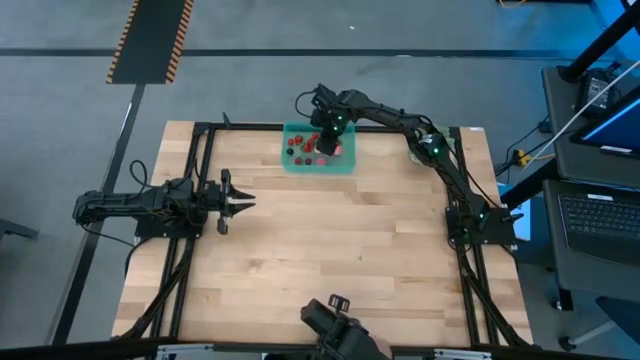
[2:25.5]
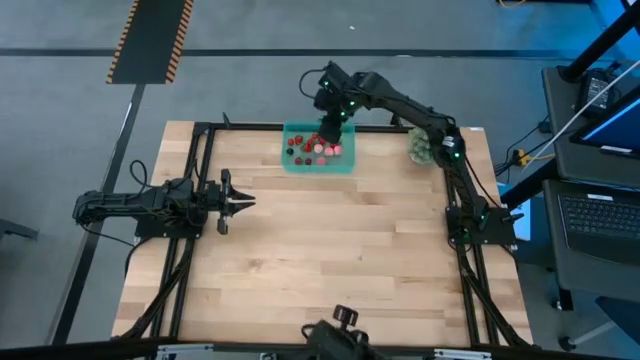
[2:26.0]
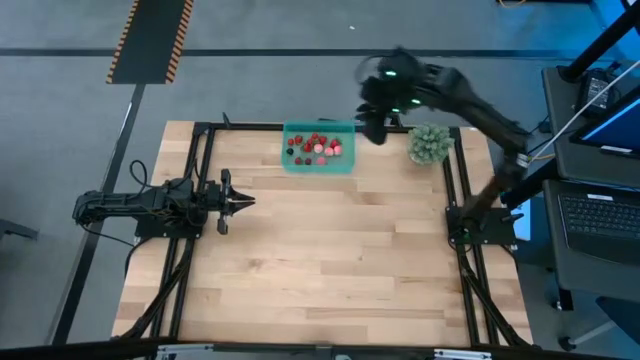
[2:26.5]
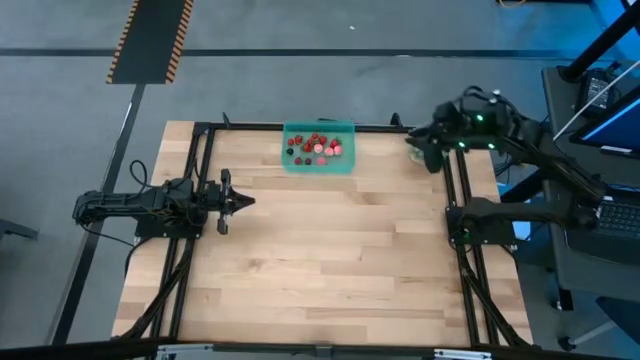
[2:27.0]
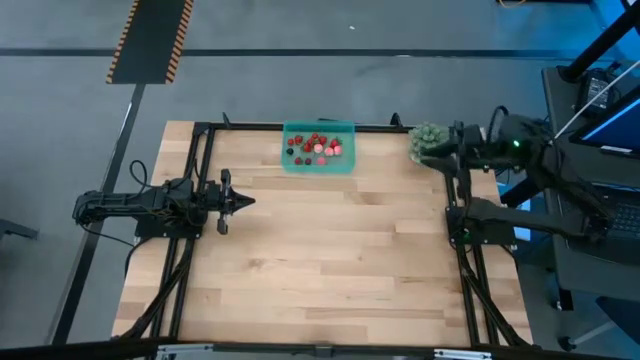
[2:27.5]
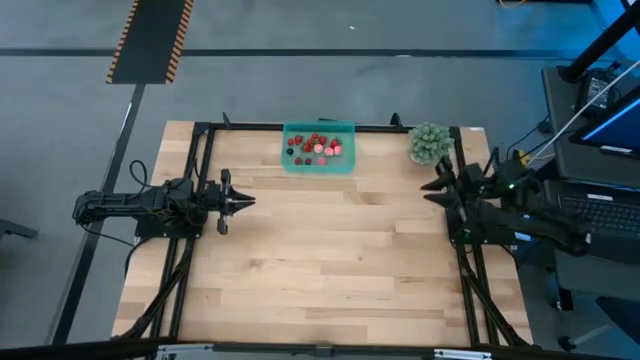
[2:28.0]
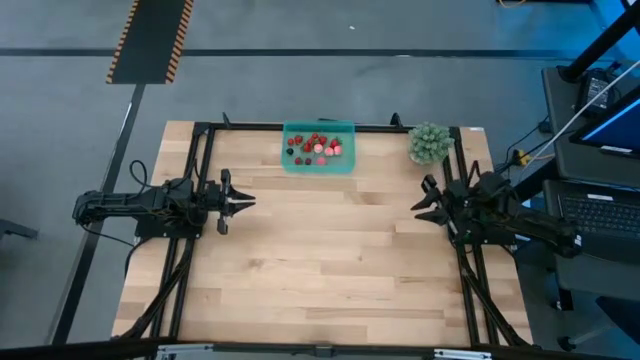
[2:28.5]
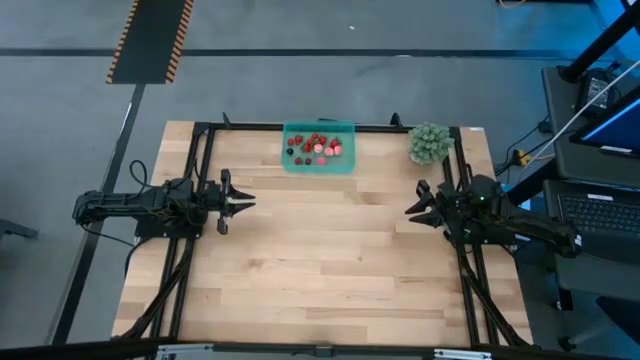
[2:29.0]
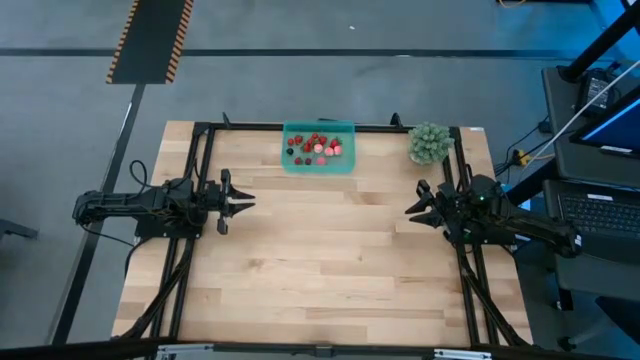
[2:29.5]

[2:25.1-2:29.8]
Task: Pick and placing Produce into tupperware
Return to Home Position

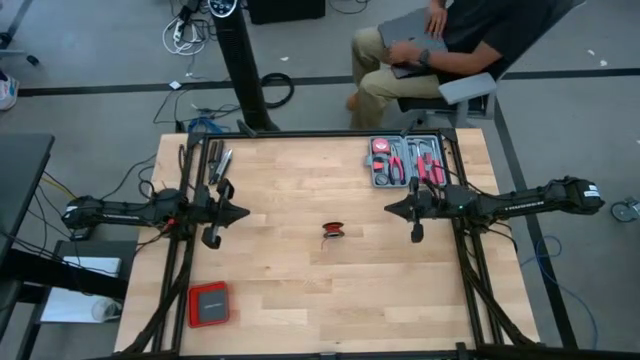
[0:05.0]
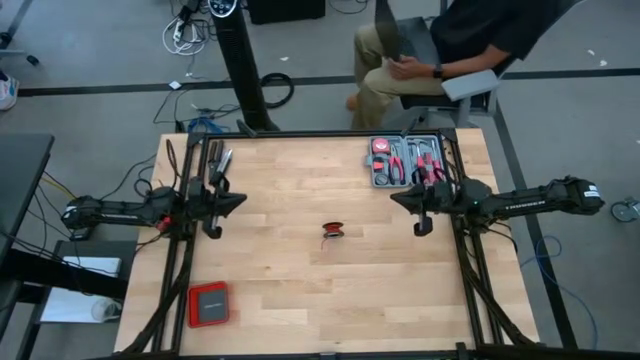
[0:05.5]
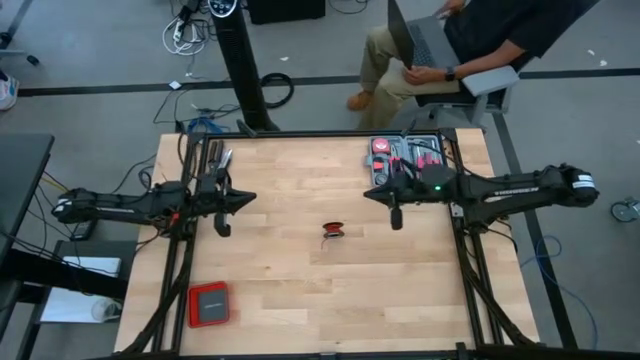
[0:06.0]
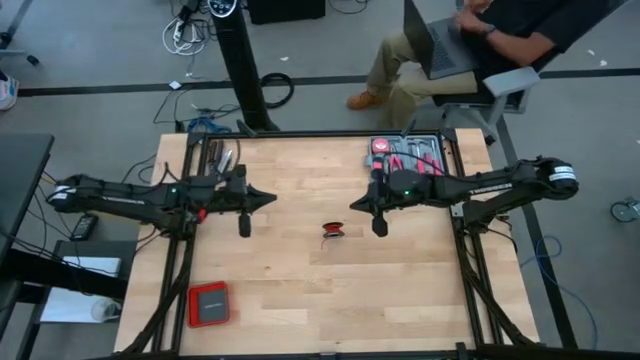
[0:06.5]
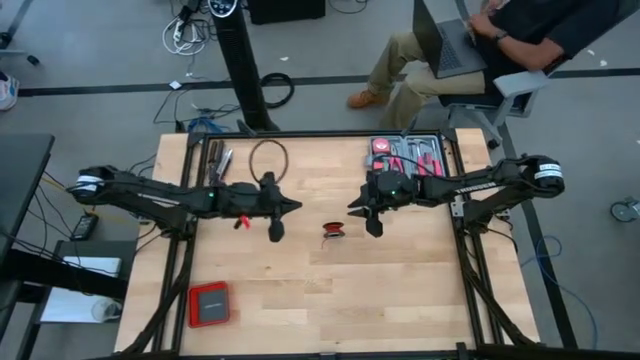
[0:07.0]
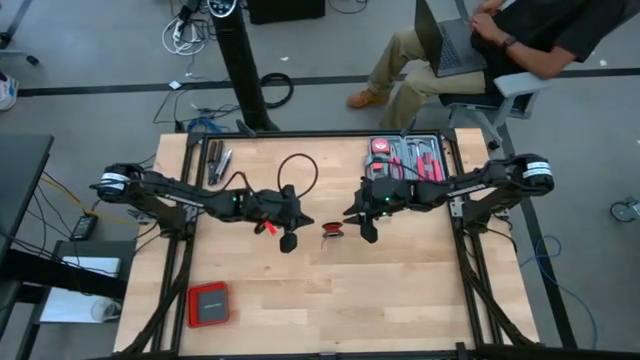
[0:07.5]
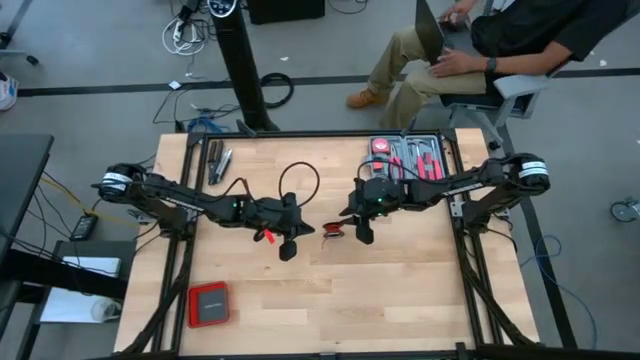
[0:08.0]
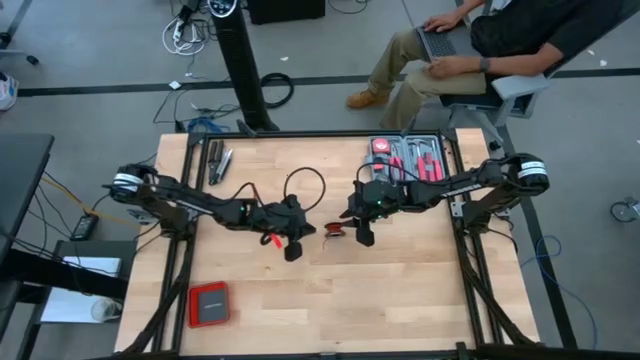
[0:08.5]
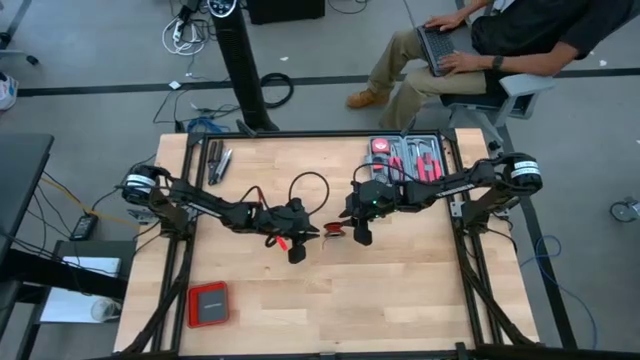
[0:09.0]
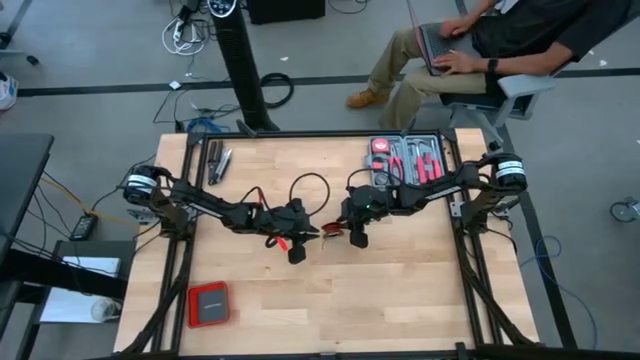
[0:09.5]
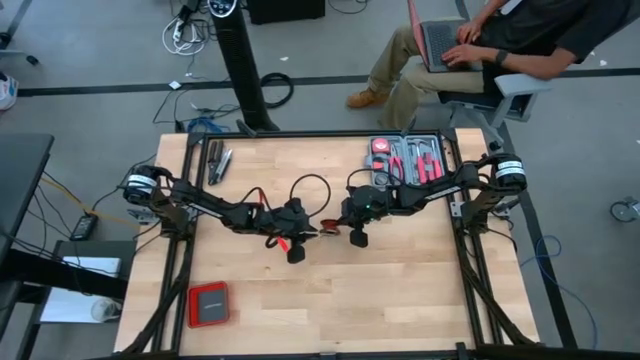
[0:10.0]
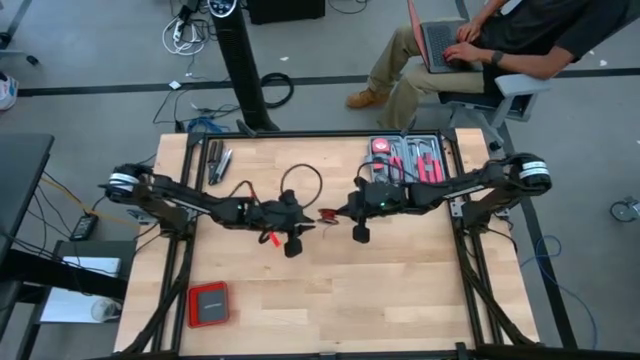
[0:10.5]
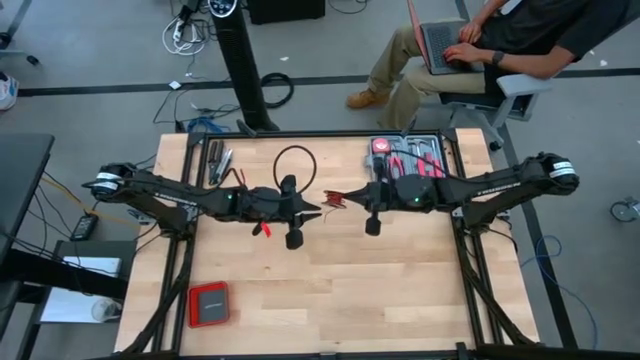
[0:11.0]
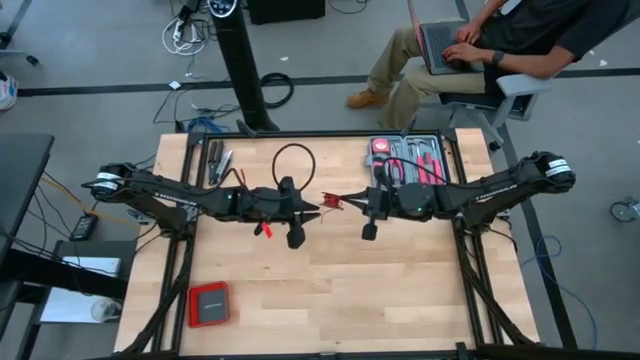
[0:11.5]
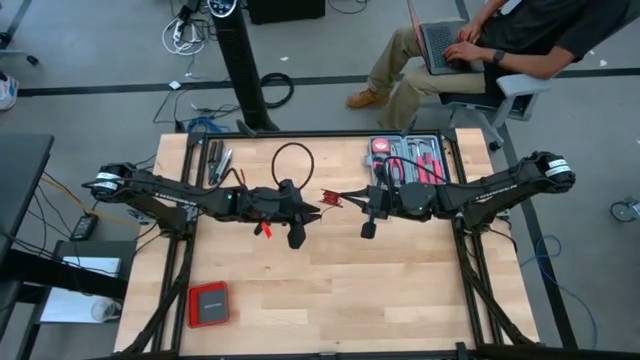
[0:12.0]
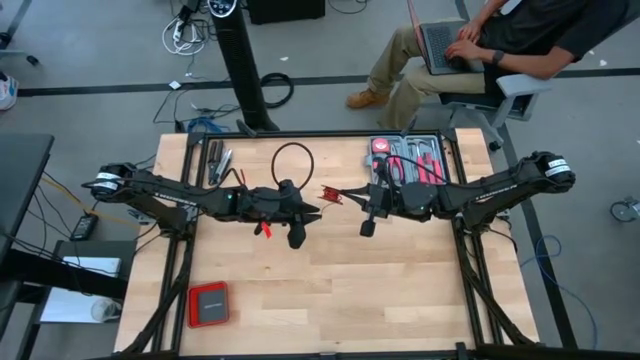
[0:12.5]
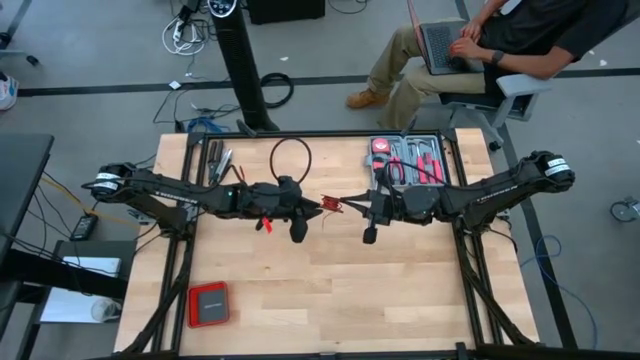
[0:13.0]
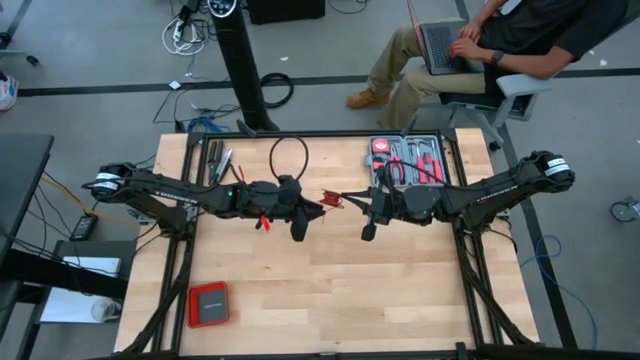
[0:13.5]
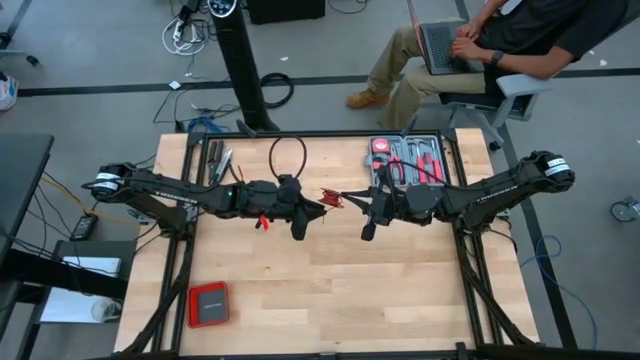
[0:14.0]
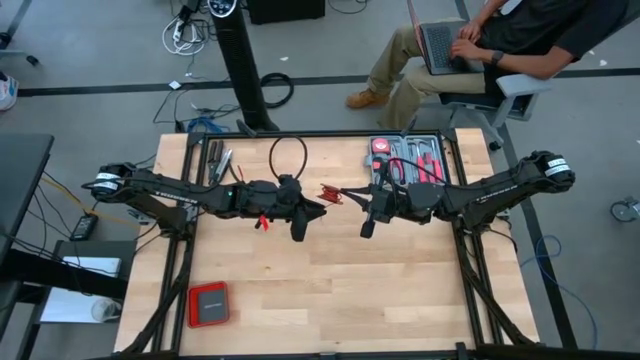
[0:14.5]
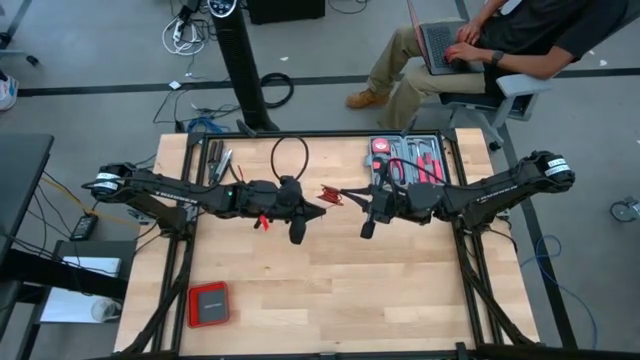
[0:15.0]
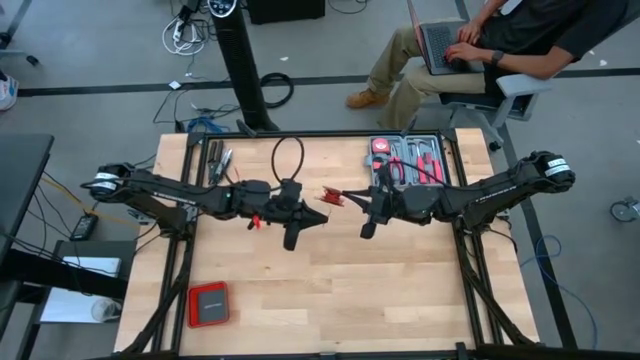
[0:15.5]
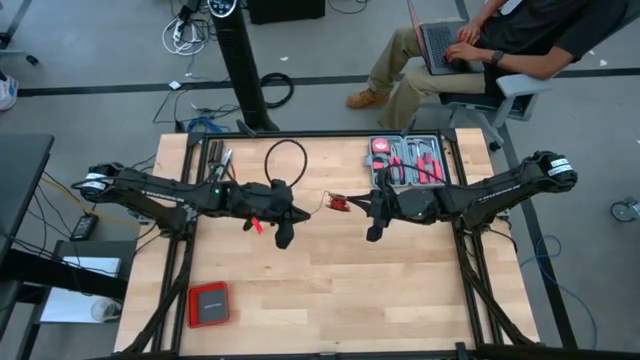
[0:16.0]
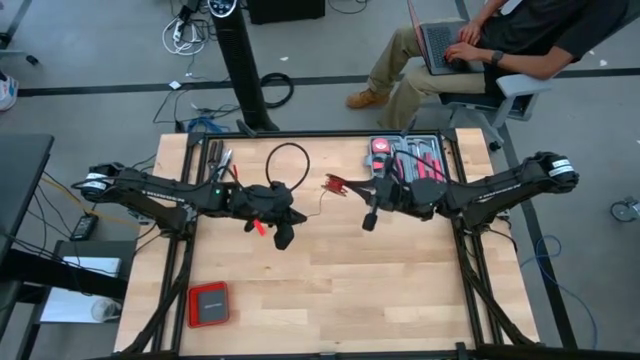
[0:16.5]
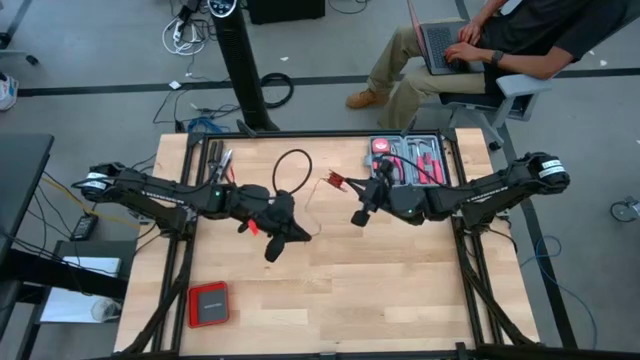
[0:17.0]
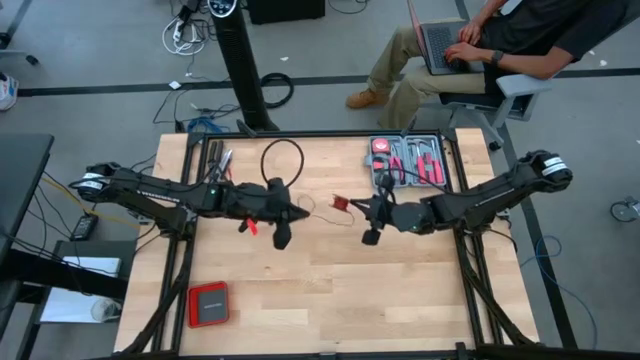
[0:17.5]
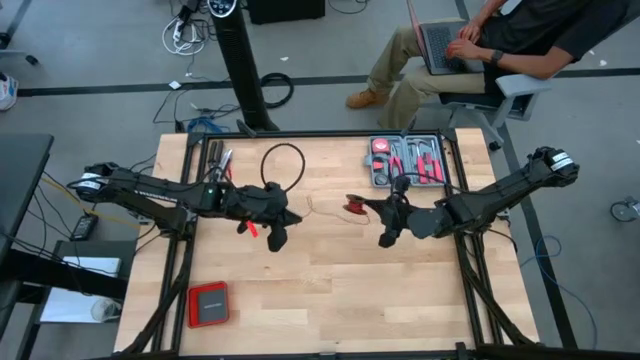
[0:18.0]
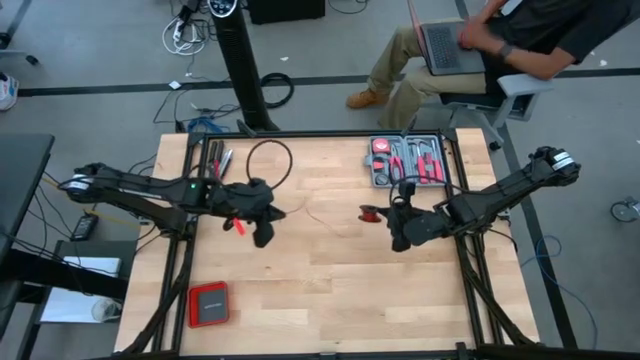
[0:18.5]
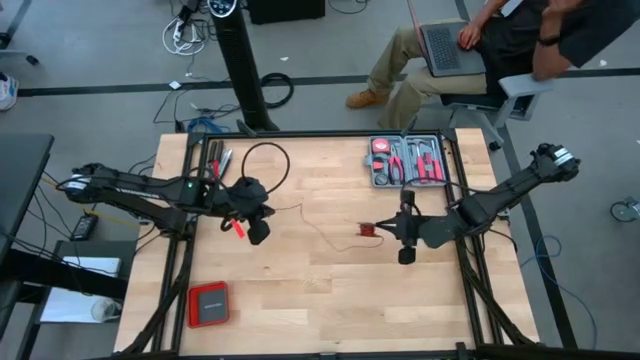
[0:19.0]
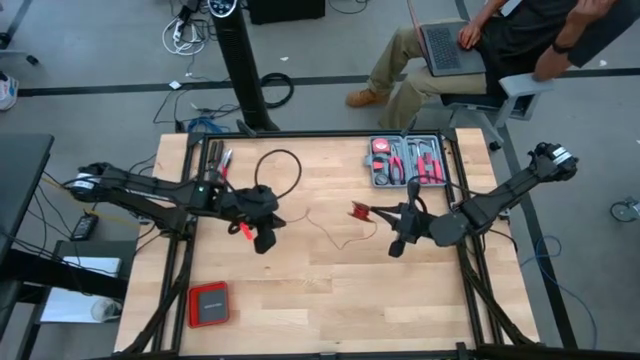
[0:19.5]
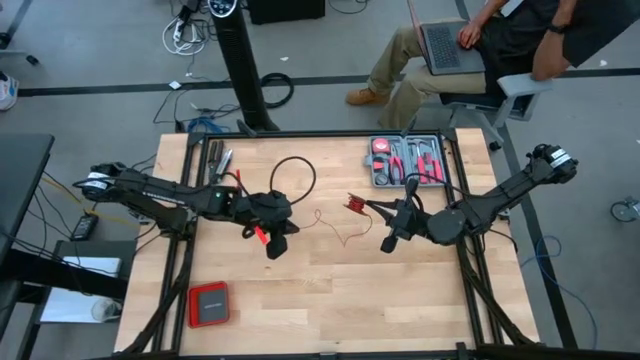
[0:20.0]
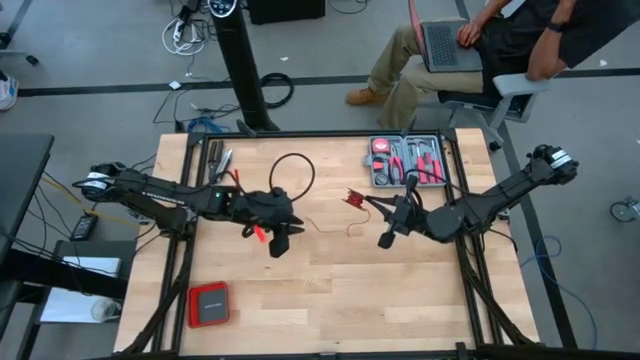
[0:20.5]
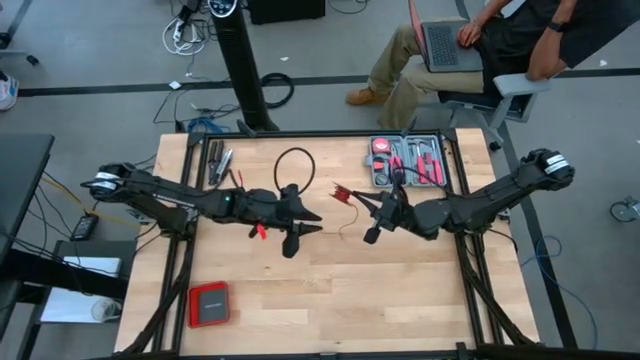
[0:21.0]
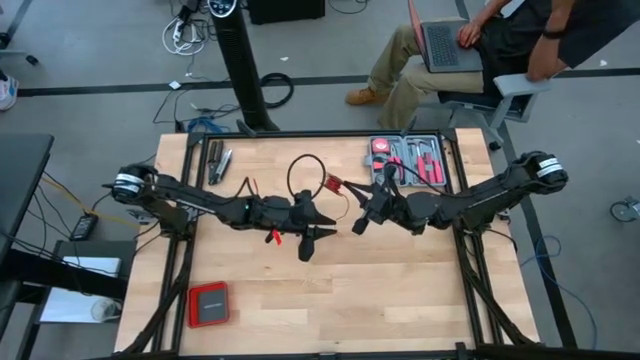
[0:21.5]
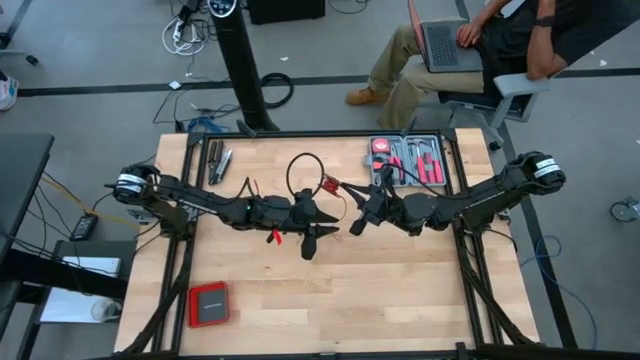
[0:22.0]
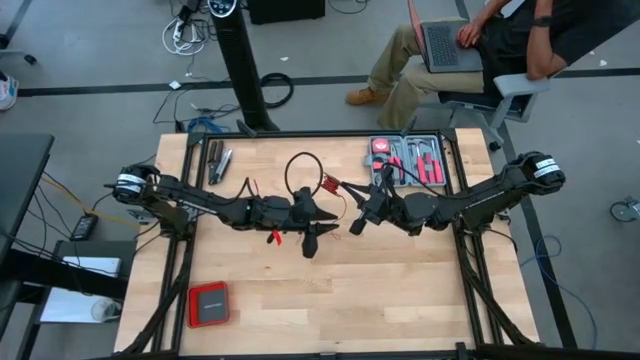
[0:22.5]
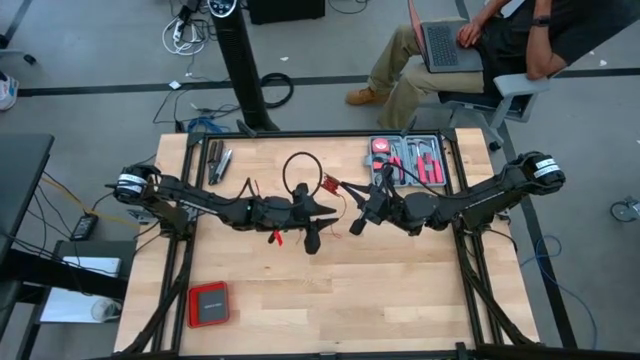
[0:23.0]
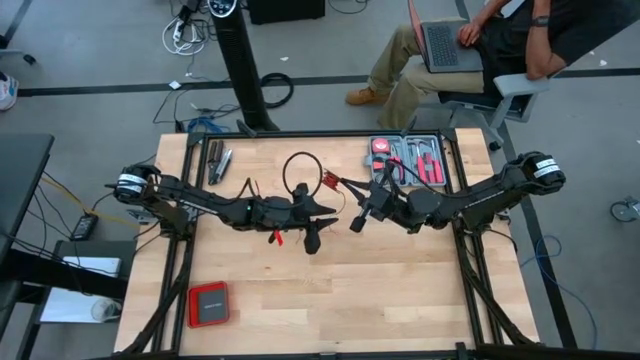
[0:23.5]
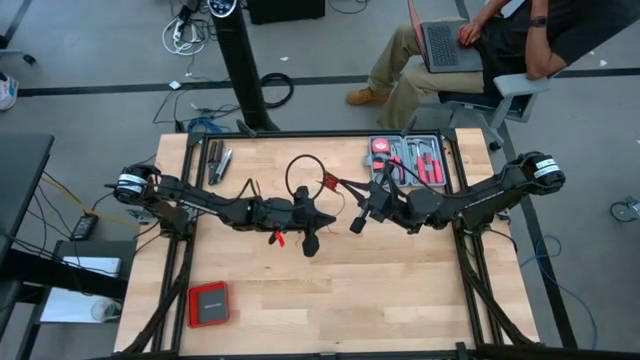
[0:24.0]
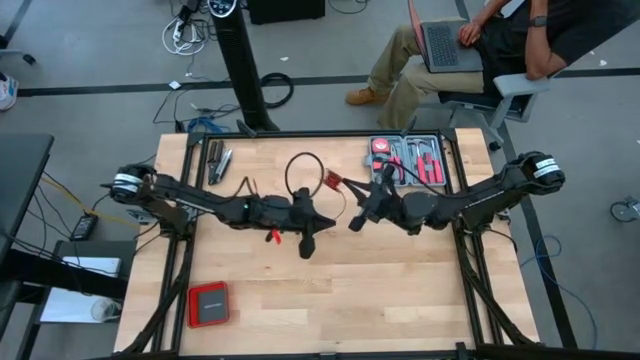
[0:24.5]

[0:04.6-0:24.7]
Task: Coil cords
Uncoil the red cable wire from the black spool
